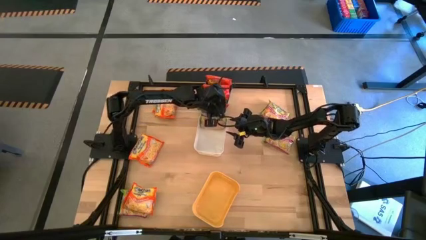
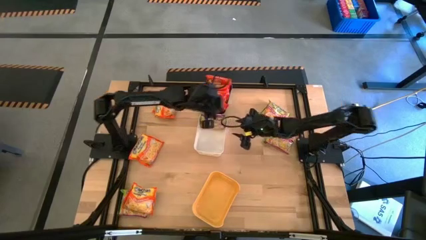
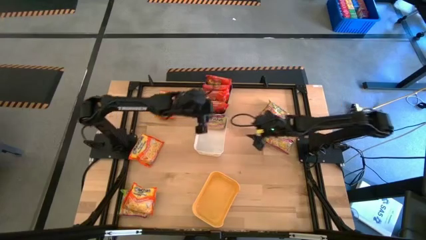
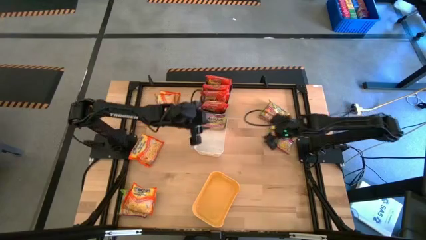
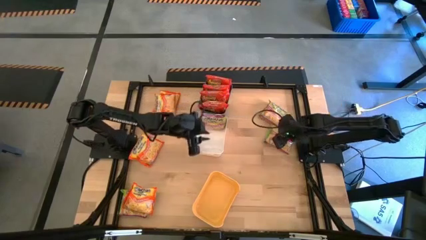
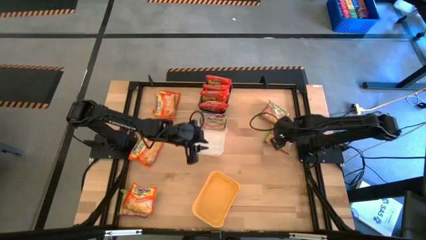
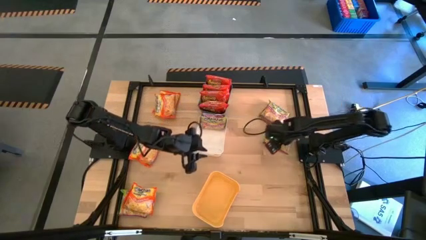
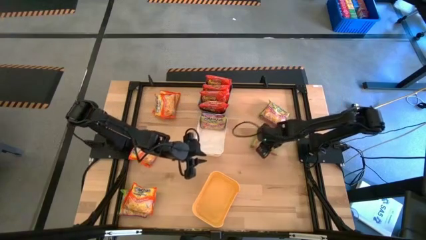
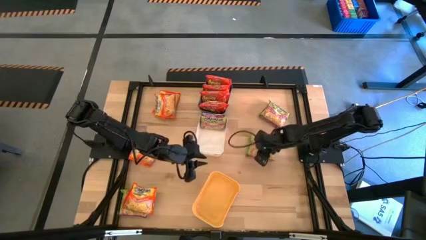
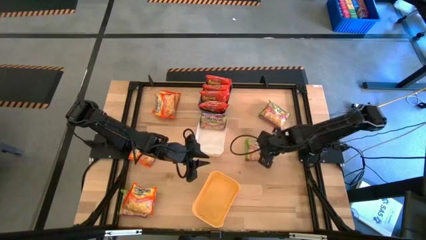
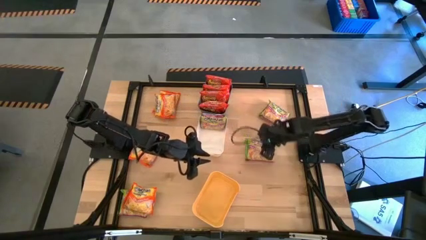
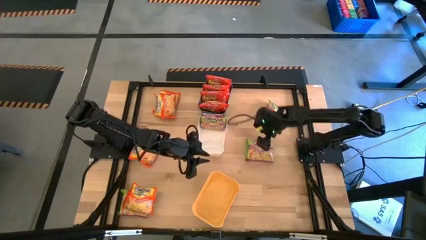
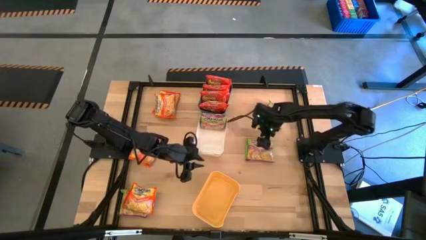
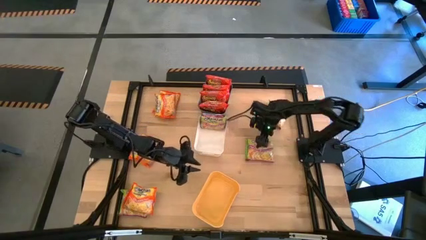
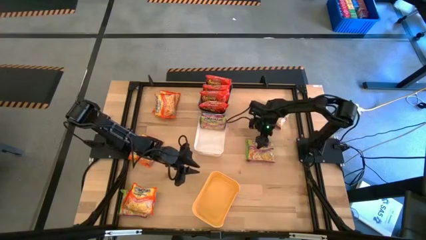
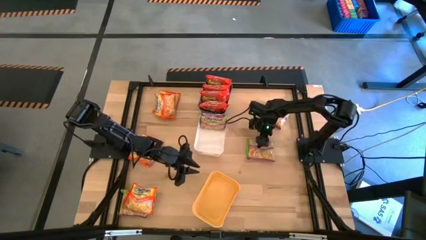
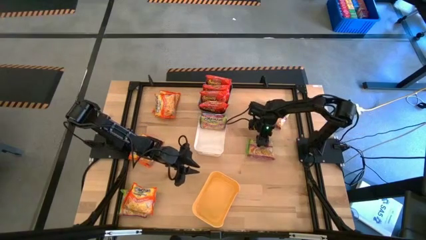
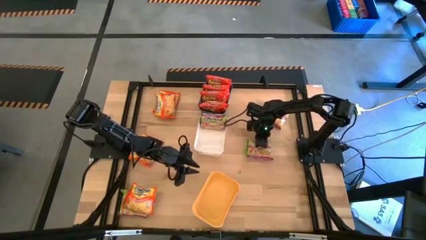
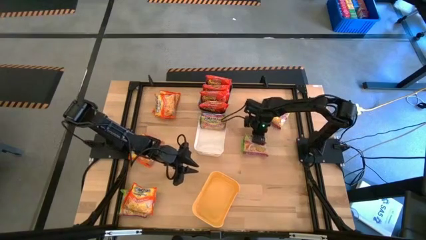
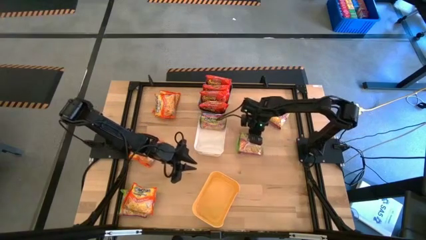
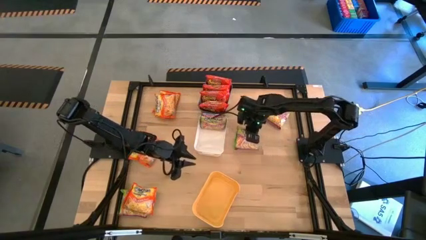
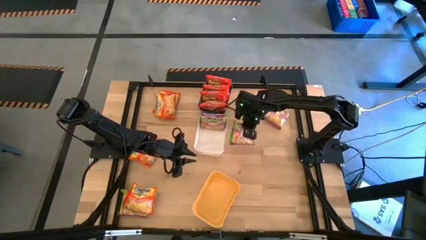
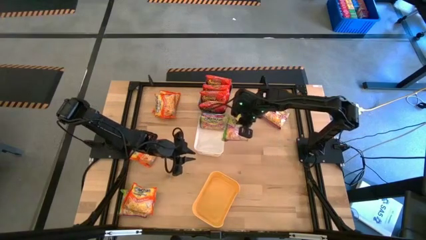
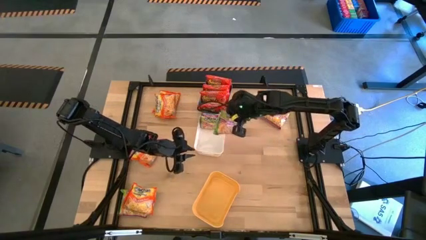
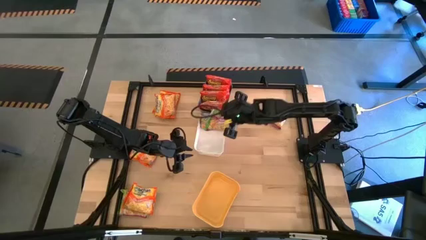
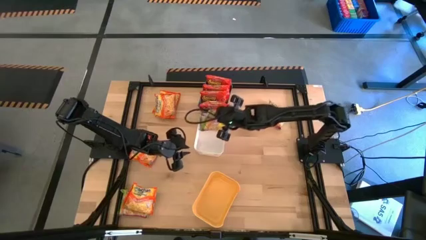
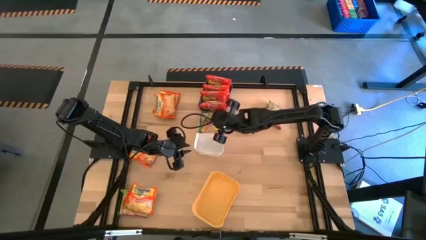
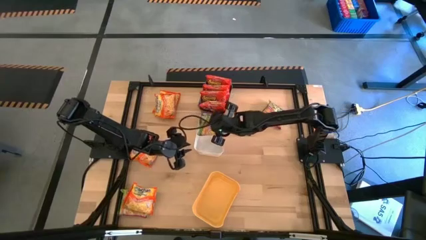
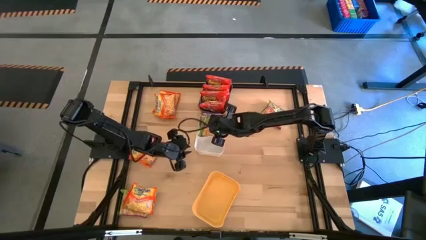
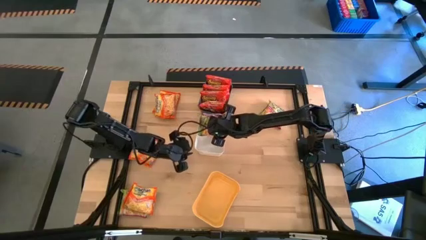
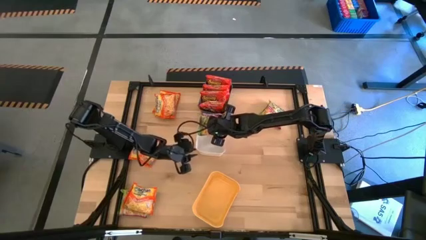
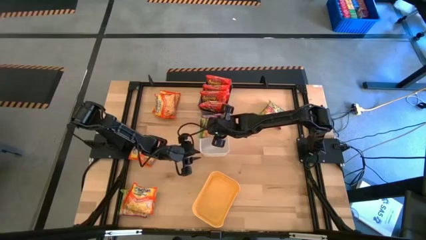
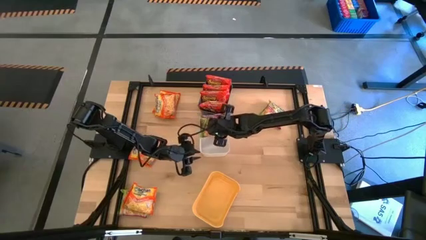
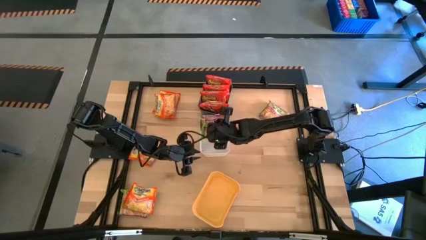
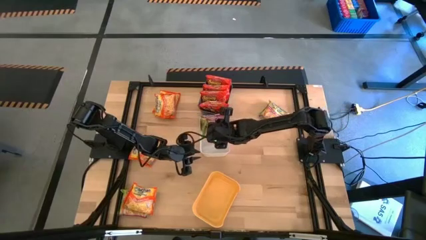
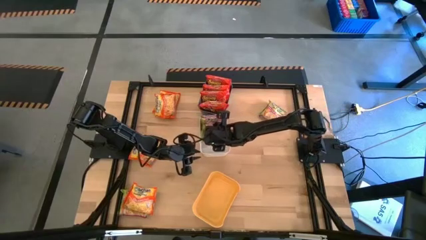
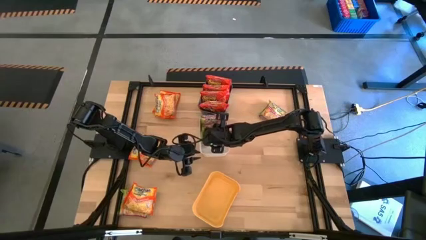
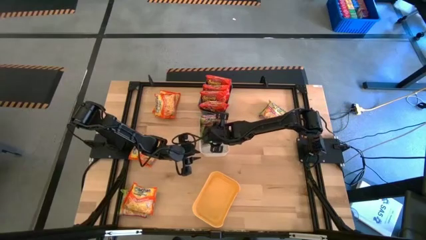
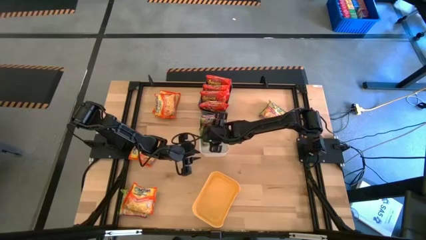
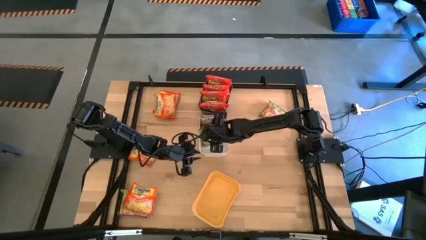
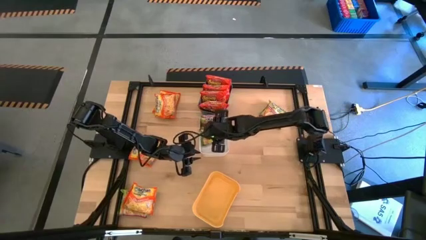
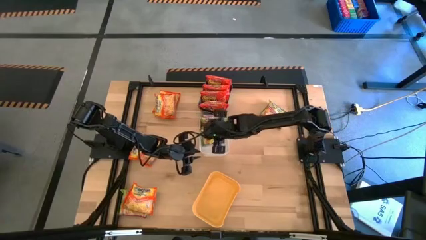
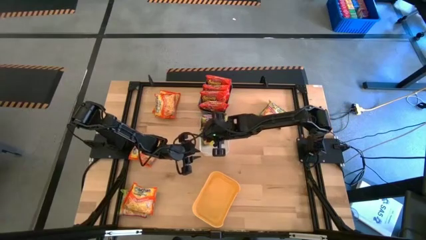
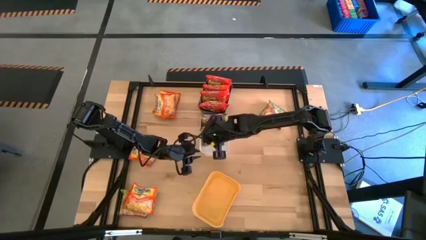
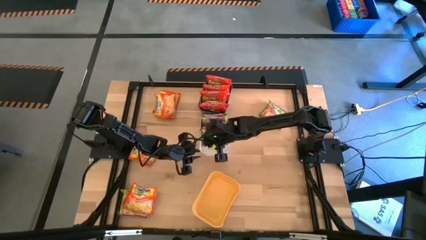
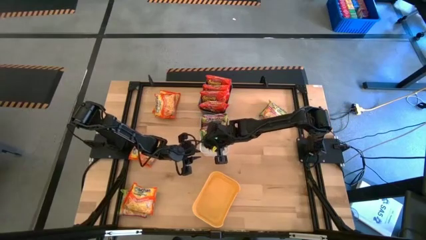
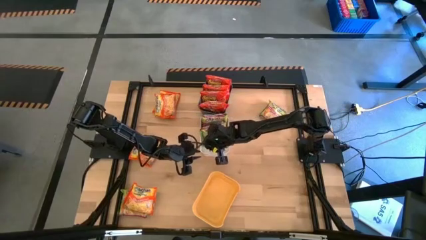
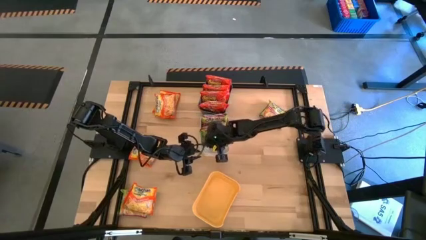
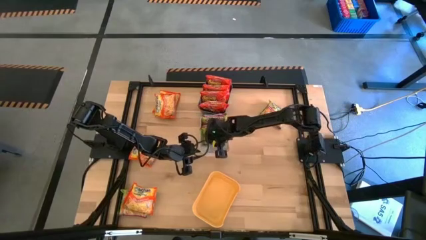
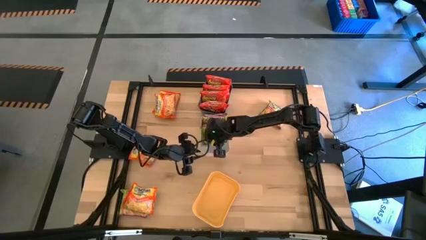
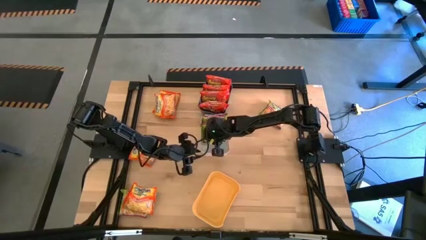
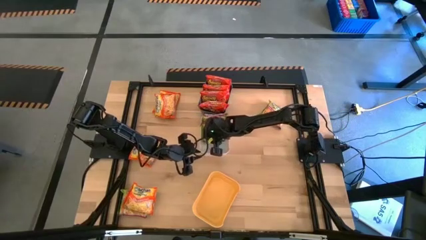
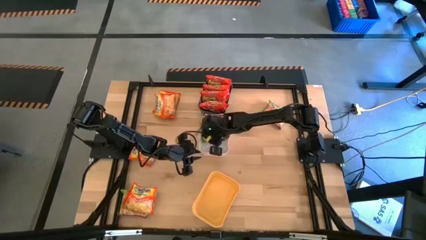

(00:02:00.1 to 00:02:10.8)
Task: Sort Maruchan noodles
Put the green noodle pack into the white bin

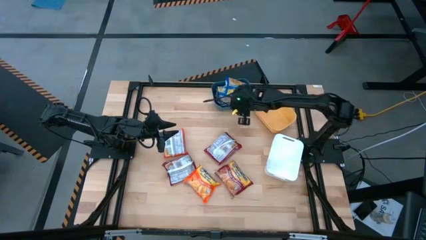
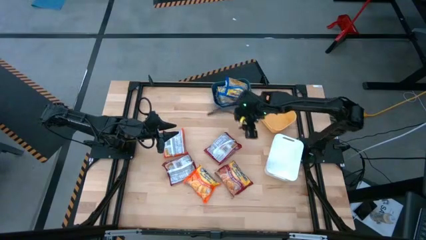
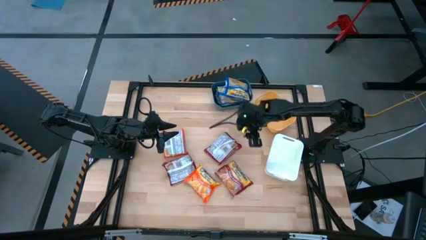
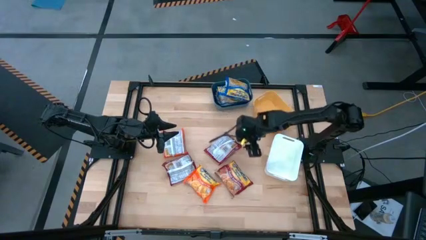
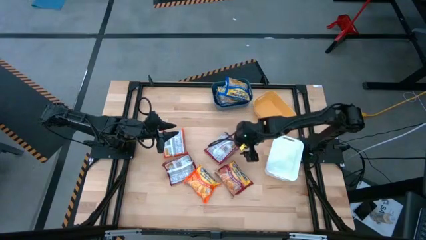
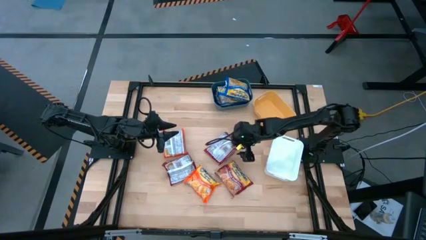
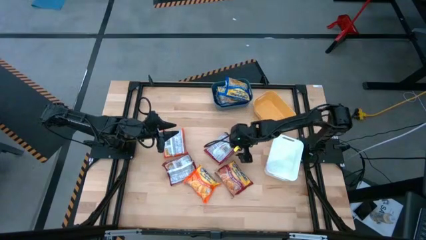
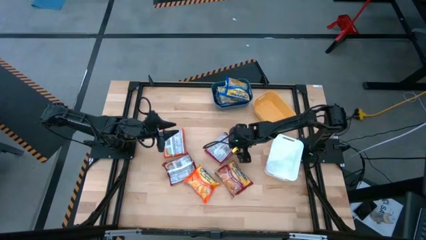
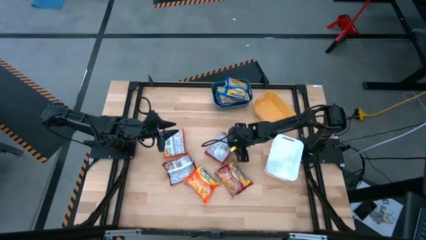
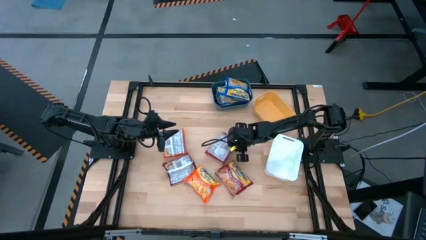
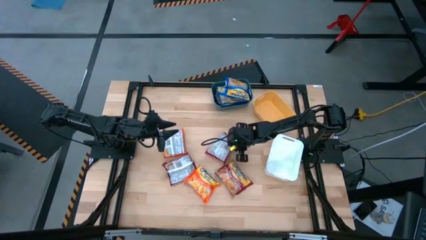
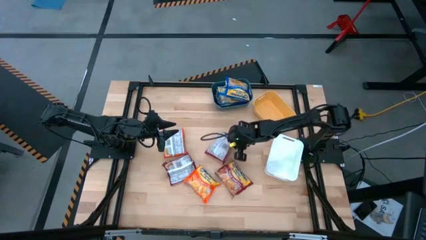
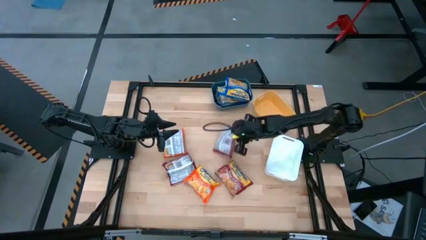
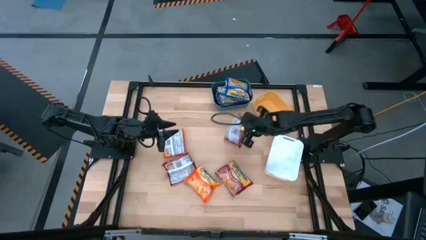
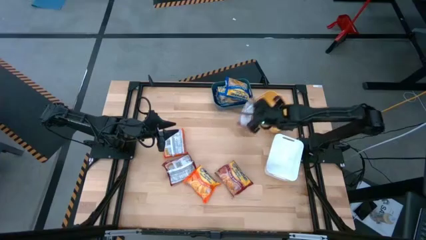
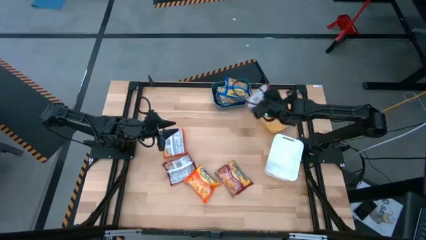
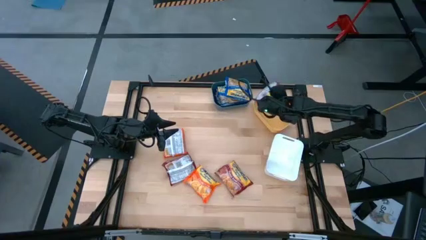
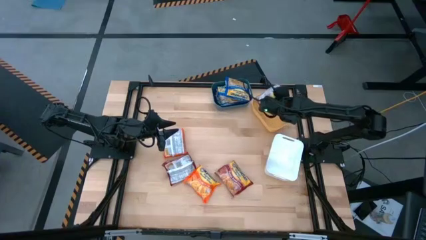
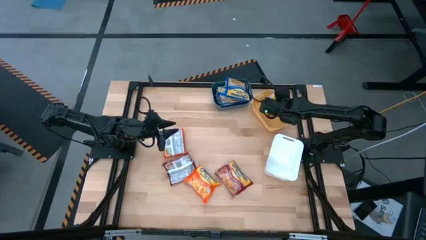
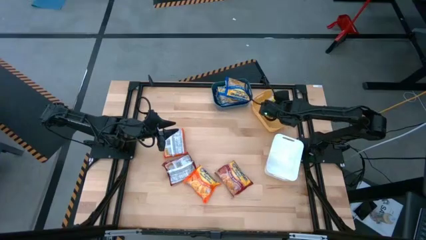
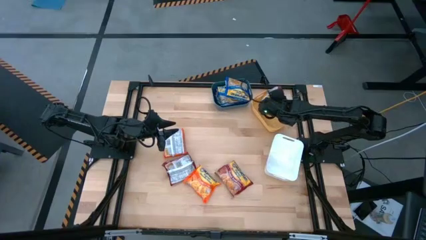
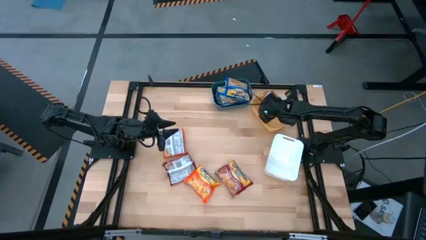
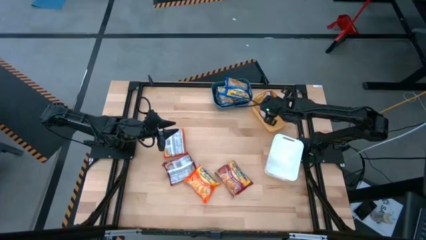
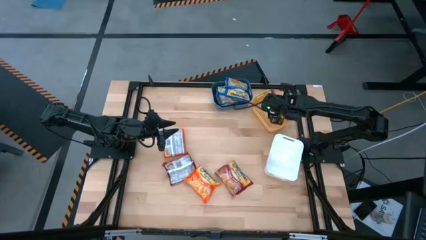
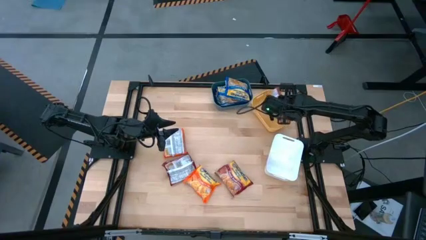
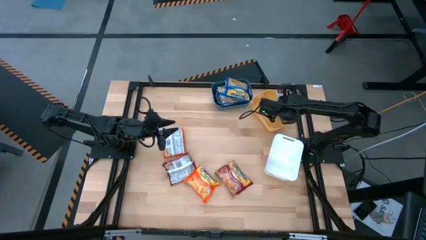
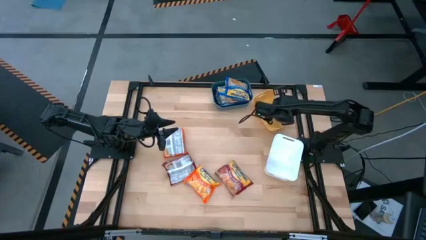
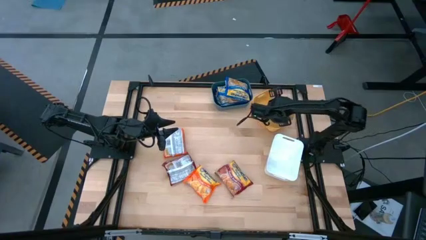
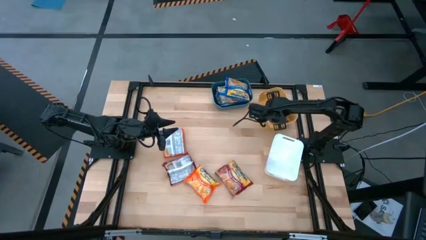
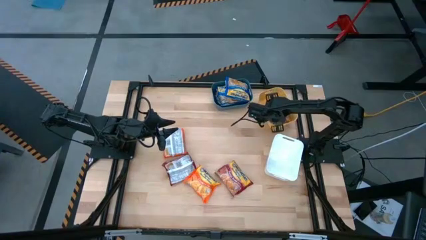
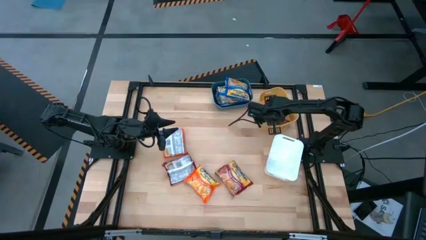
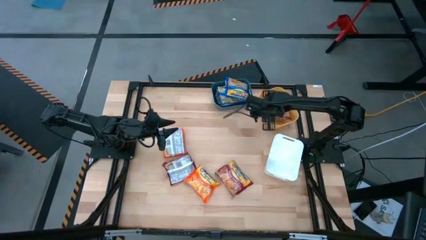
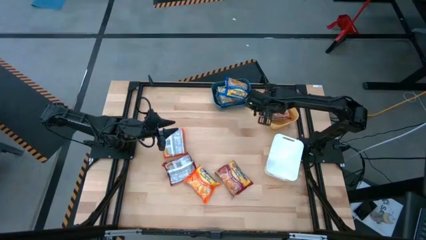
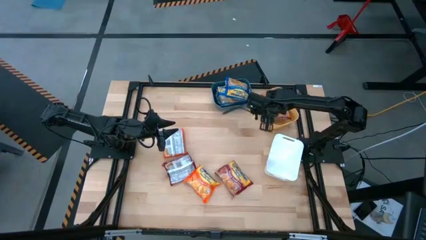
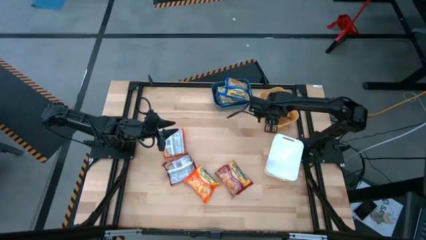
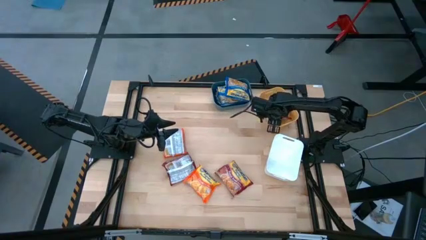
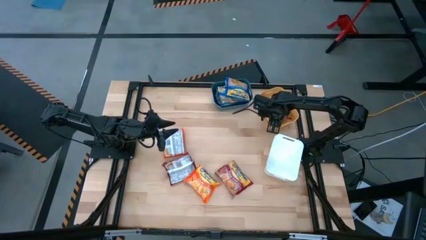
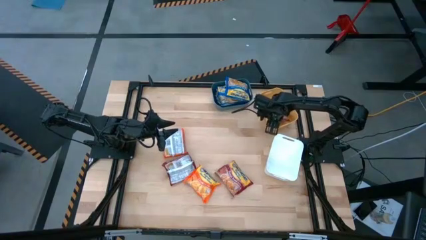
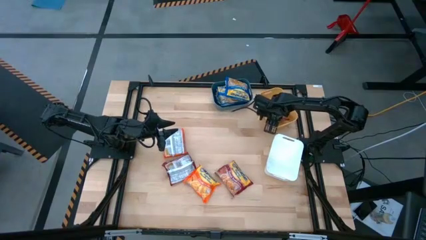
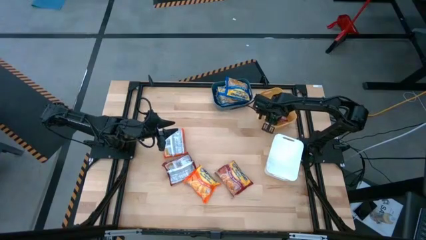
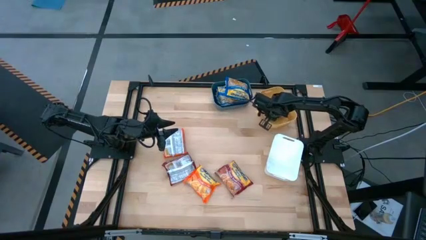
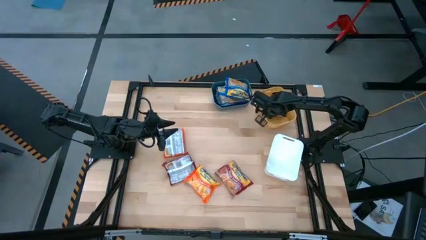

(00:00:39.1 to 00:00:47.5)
Task: Sort Maruchan noodles
Put the top red noodle pack into the yellow bin
